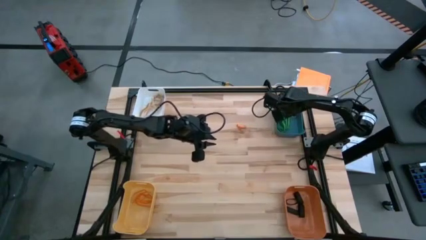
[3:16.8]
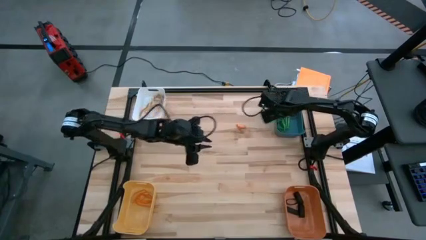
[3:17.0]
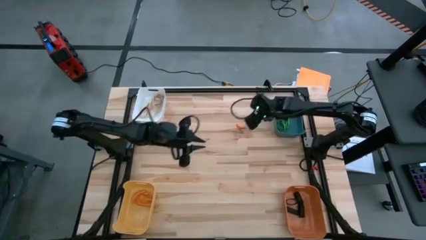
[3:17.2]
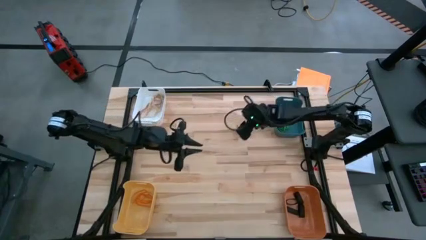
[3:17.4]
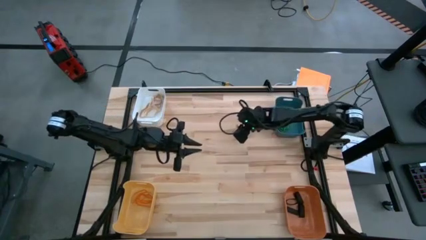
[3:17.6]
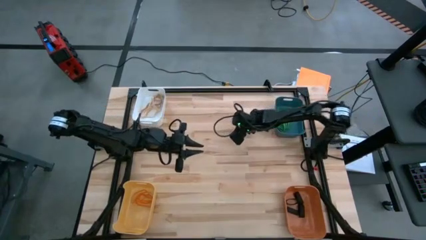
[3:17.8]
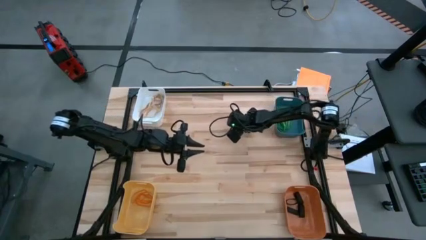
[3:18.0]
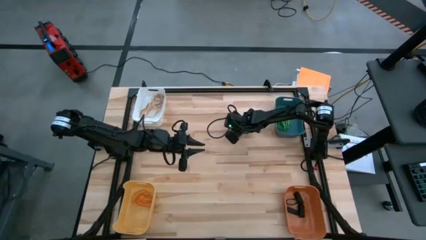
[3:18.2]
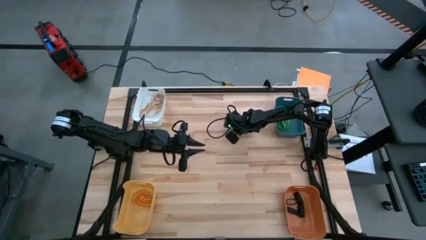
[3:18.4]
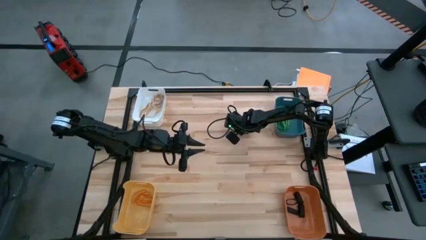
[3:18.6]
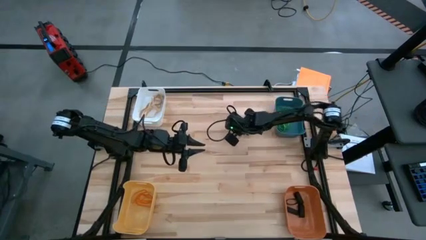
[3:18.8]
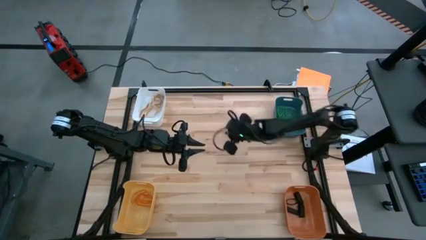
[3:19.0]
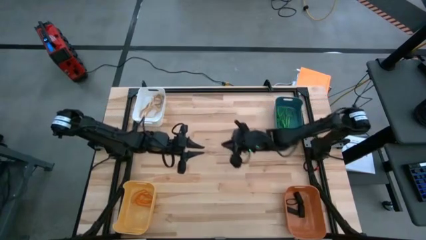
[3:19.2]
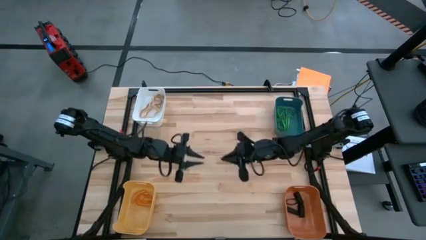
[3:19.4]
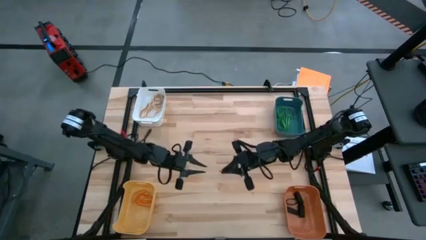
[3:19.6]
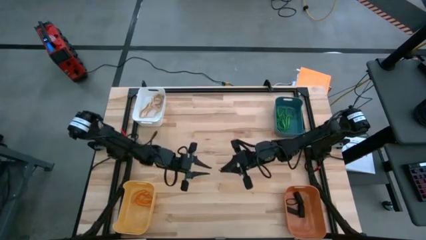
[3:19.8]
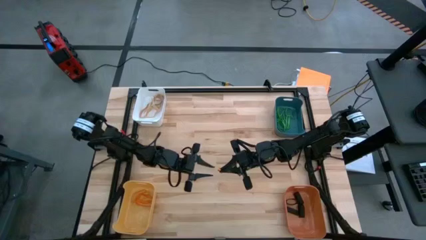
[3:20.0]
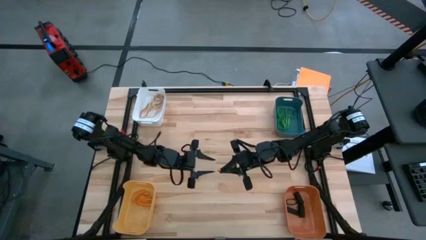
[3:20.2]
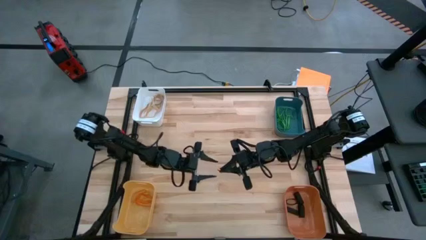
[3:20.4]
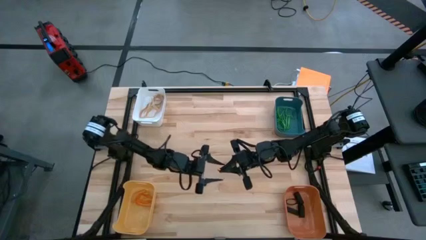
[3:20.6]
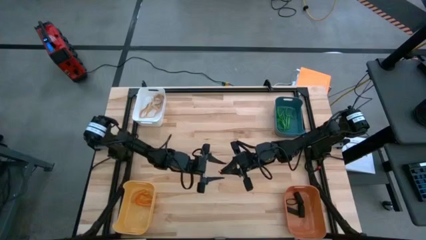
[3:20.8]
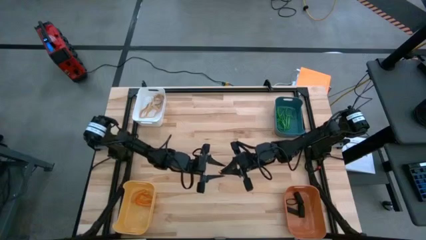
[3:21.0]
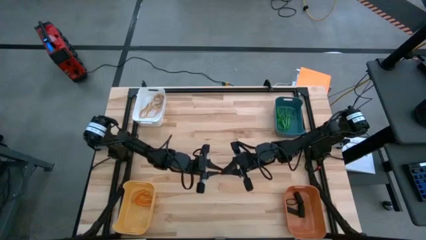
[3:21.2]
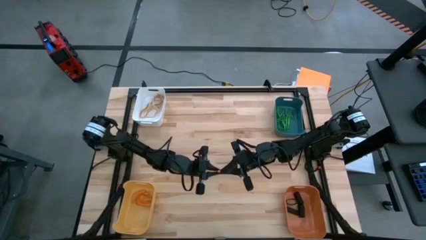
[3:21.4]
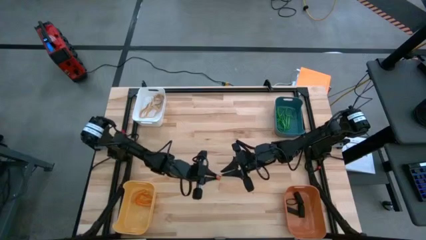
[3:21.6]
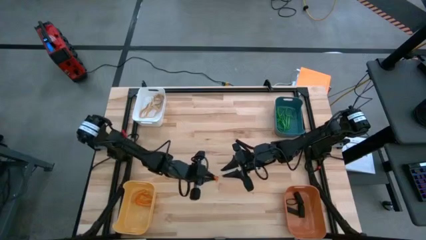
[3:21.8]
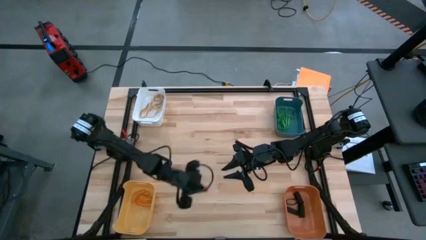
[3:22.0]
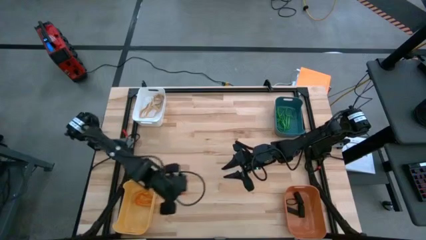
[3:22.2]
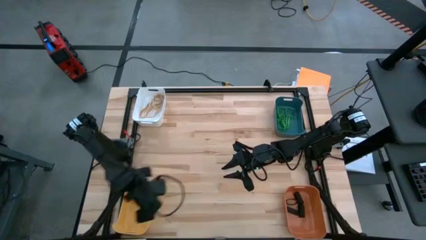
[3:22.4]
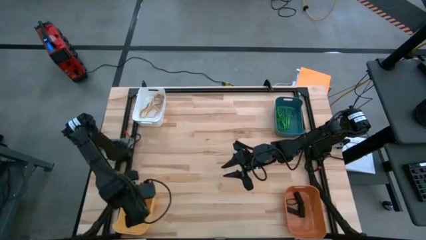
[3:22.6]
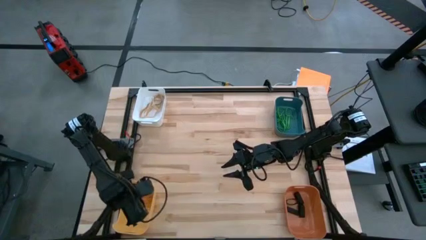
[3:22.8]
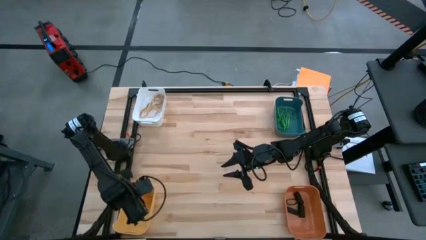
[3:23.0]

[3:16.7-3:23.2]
Task: Sort rubber bands into baskets
Put the orange rubber band into the yellow bin

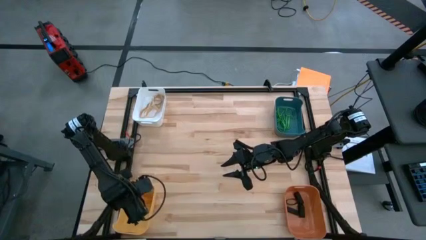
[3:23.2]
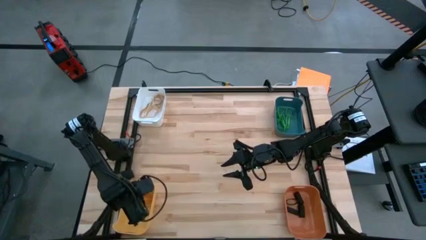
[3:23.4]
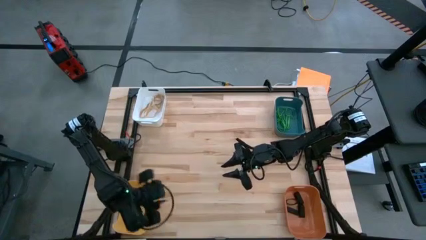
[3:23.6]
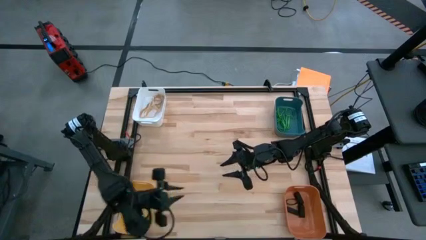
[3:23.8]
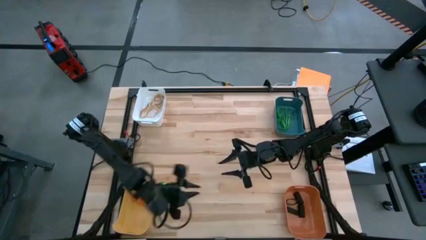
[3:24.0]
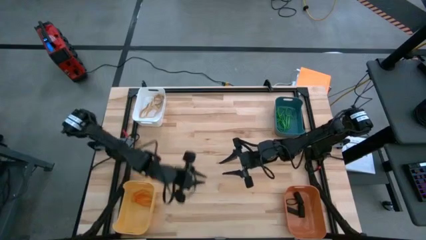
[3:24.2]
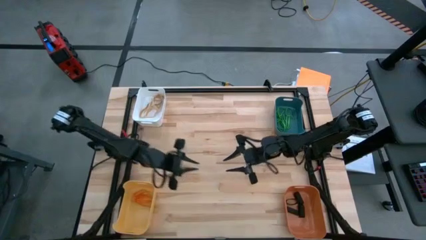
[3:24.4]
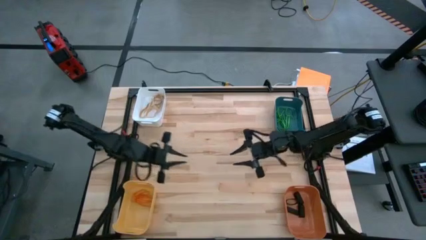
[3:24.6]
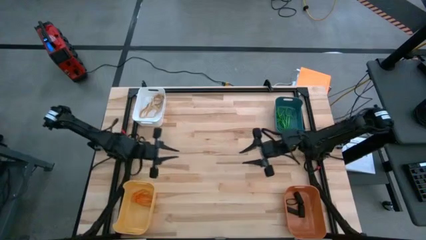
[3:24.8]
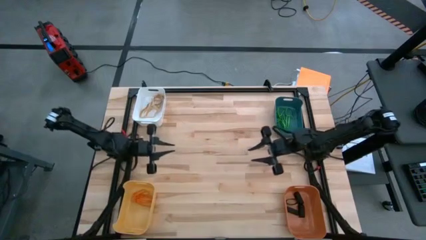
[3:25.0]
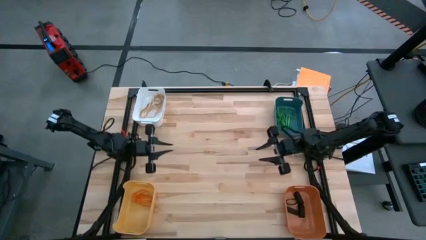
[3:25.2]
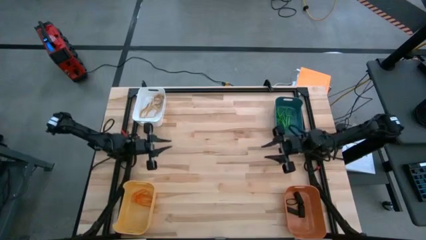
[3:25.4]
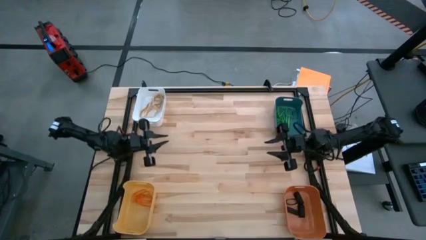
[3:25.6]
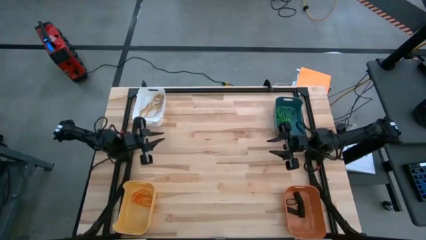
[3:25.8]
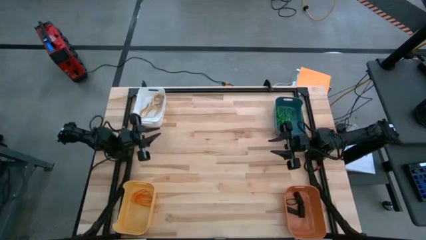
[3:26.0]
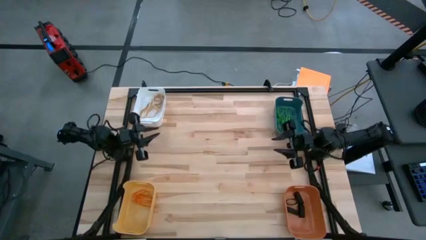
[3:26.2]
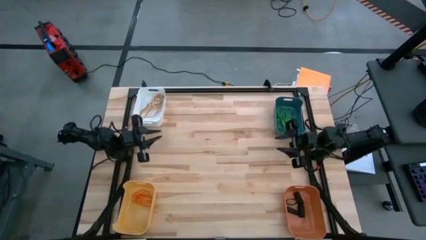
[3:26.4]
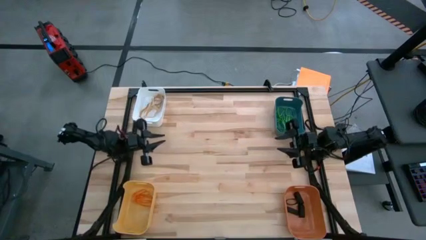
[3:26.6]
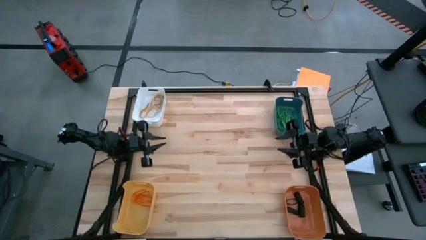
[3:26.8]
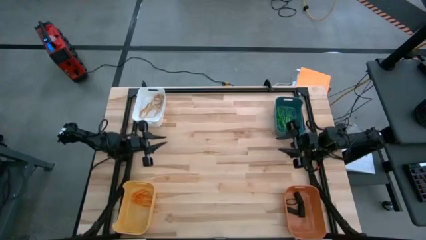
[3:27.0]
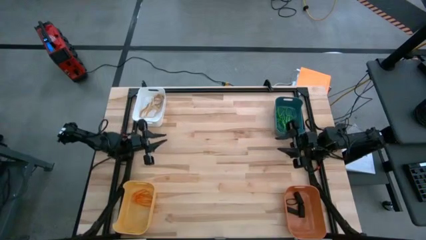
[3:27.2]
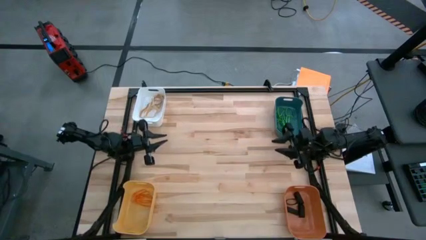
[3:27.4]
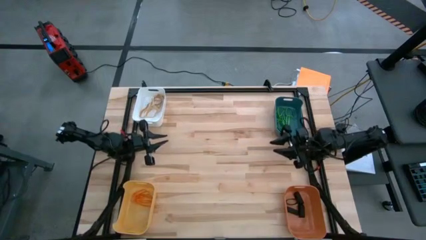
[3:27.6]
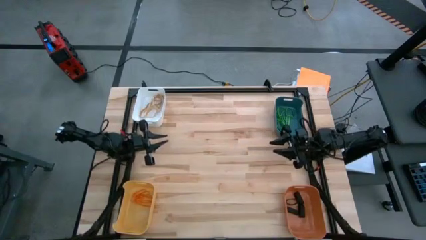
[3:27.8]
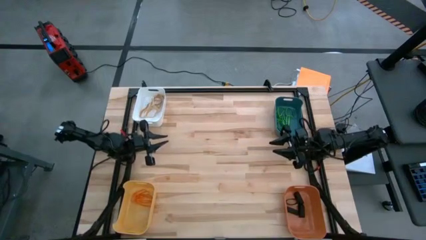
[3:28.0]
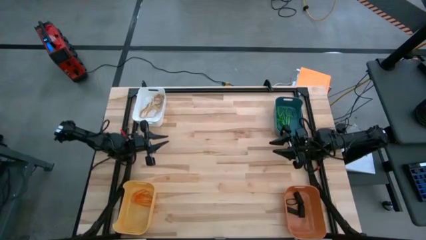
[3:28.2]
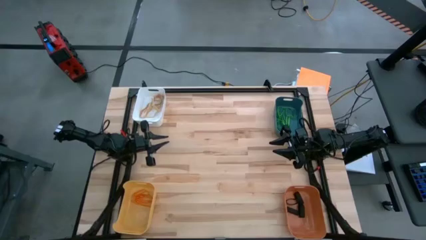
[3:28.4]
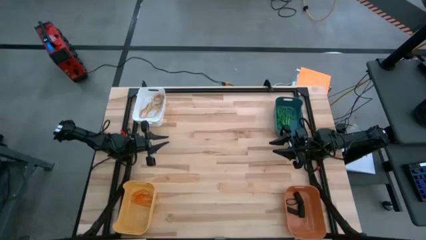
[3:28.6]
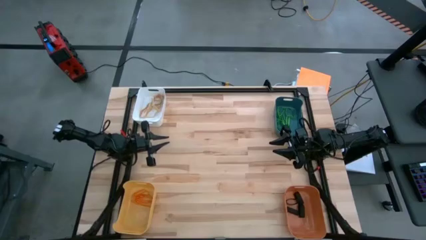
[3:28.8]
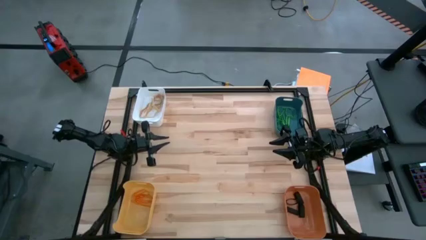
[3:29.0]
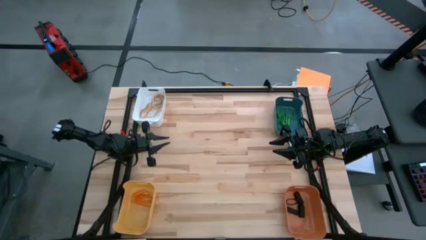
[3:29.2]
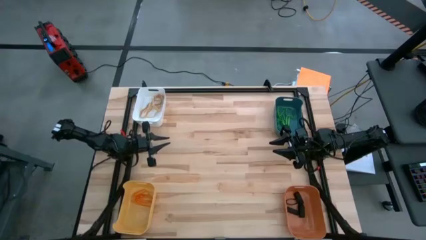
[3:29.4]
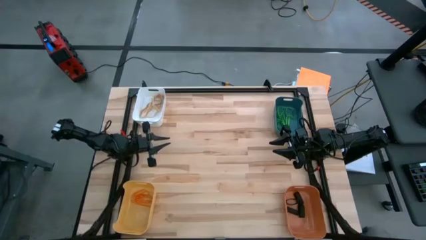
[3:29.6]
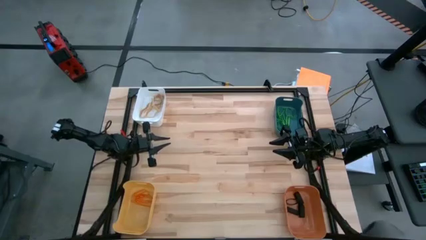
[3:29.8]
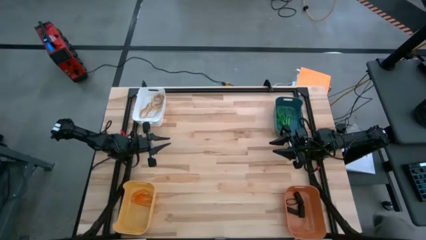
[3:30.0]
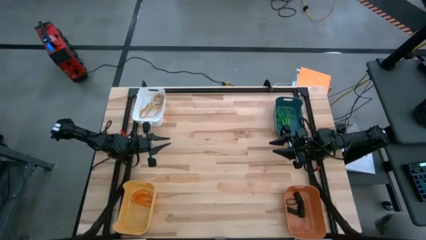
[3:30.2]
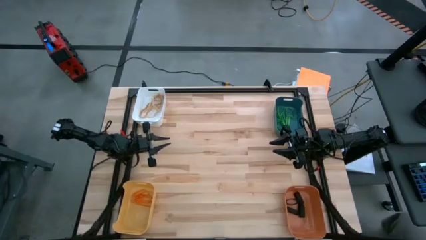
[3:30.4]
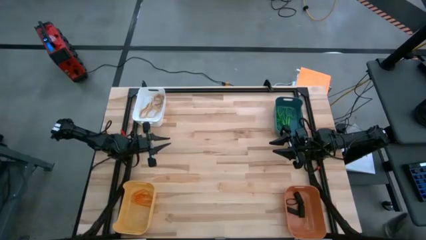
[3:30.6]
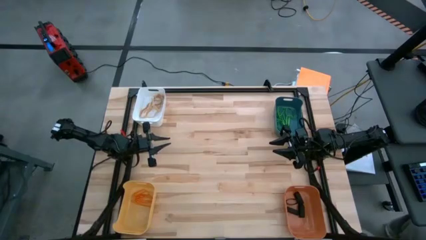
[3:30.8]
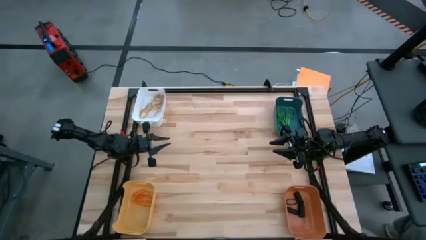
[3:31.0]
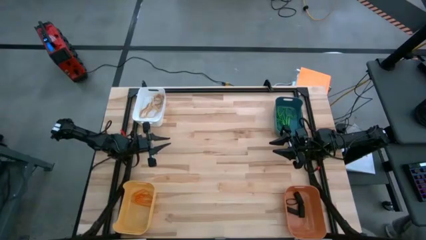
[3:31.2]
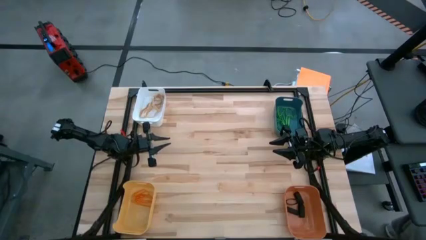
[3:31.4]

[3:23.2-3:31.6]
Return to Home Position

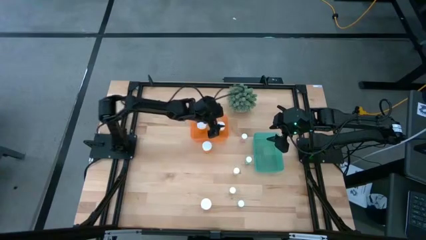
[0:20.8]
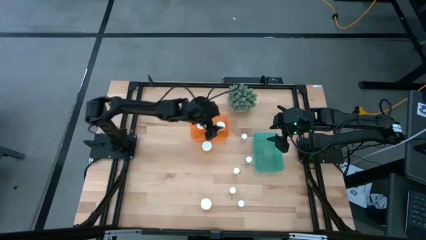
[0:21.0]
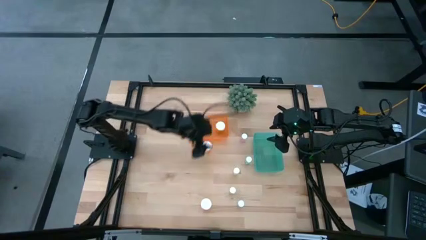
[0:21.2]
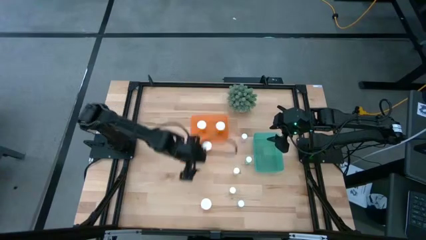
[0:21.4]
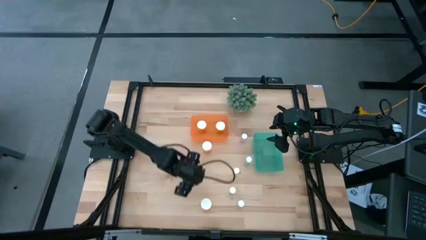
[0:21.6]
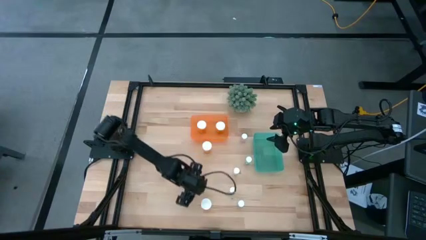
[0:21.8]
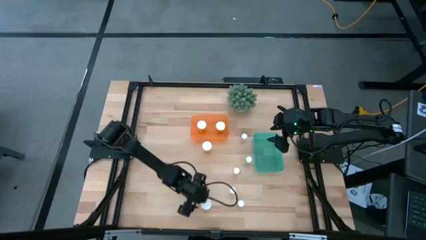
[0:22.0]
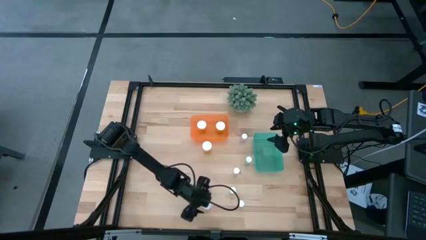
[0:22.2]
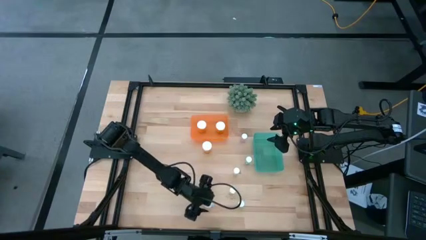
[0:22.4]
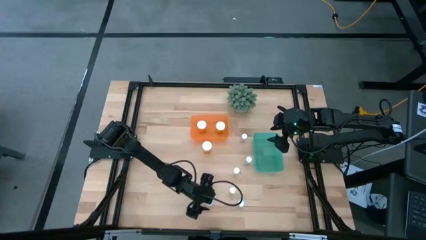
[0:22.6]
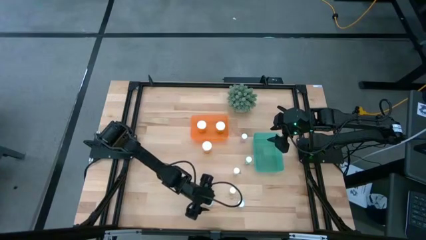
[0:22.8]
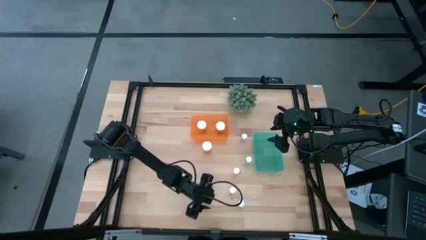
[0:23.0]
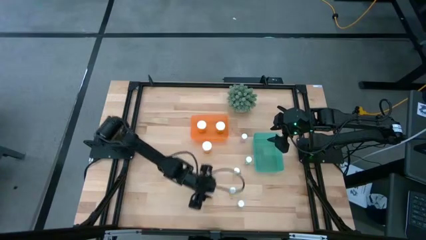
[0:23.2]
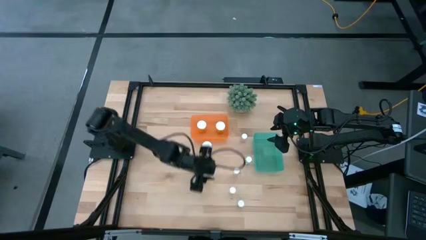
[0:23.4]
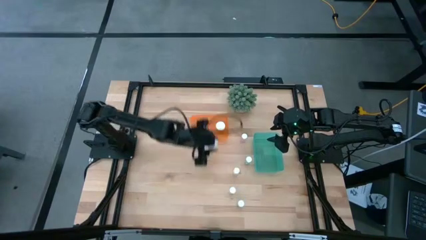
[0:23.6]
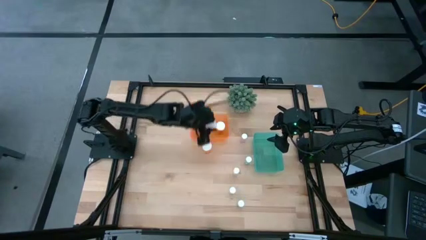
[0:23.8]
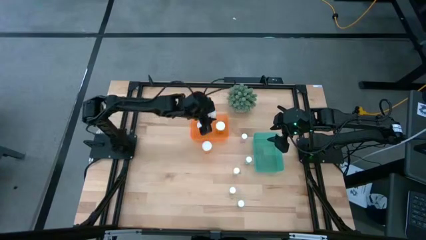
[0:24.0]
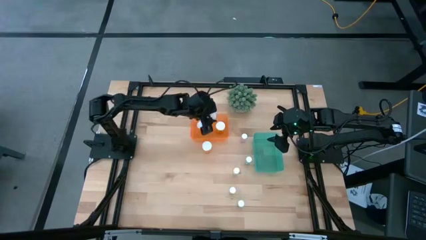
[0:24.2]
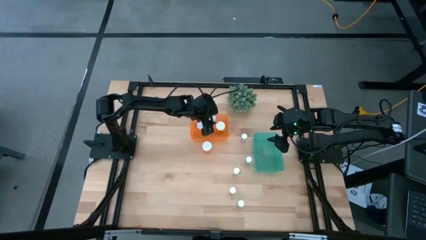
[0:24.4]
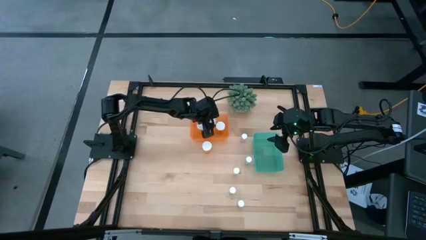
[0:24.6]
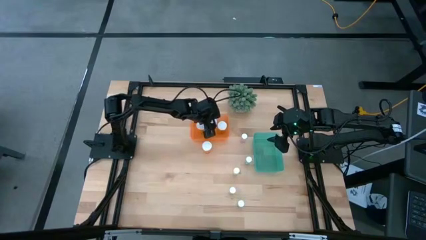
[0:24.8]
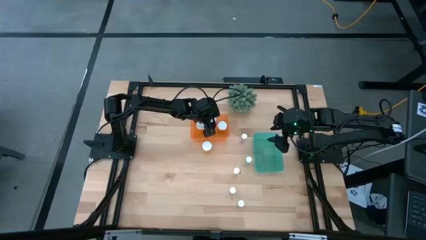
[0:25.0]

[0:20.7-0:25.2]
Task: Pick and place medicine bottles into bin by pill shape (circle, oval)
Put the orange pill bottle into the orange bin
